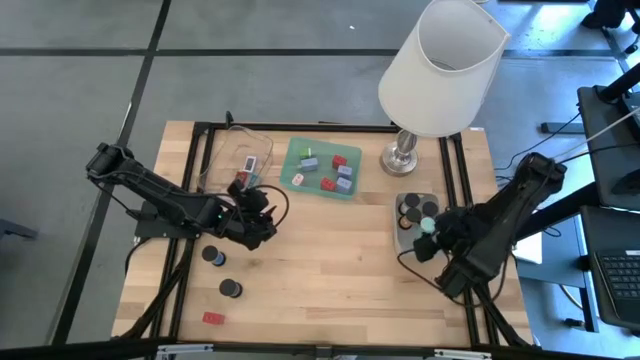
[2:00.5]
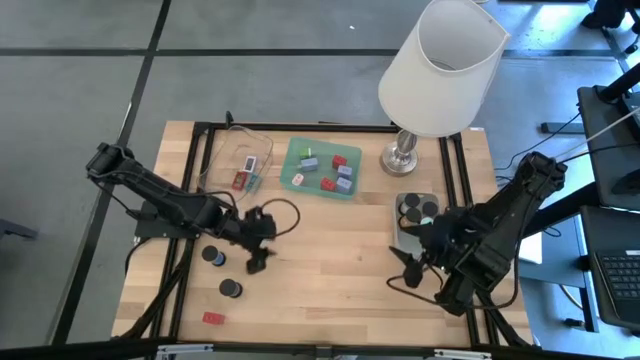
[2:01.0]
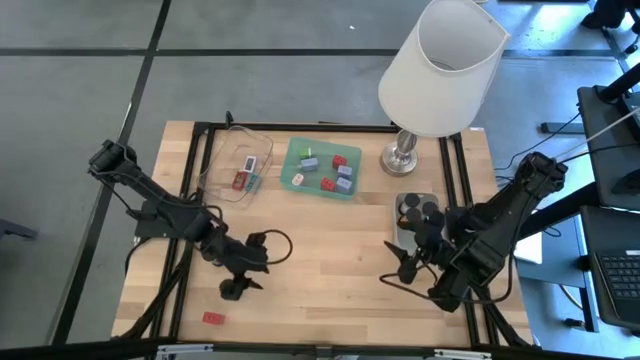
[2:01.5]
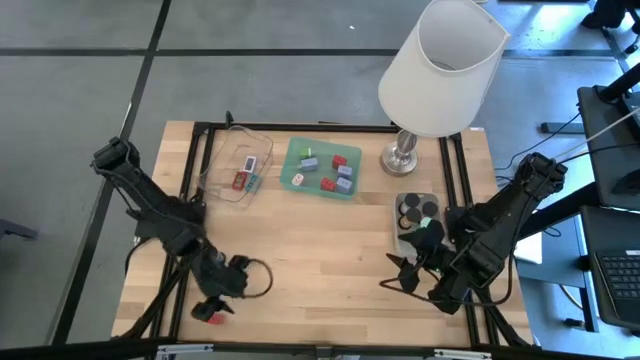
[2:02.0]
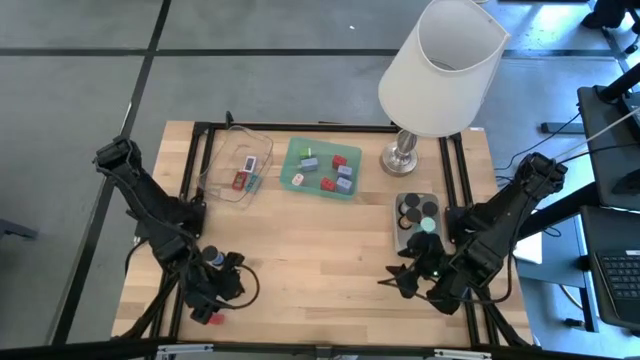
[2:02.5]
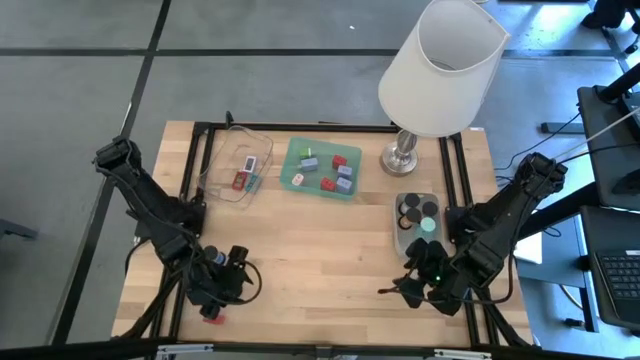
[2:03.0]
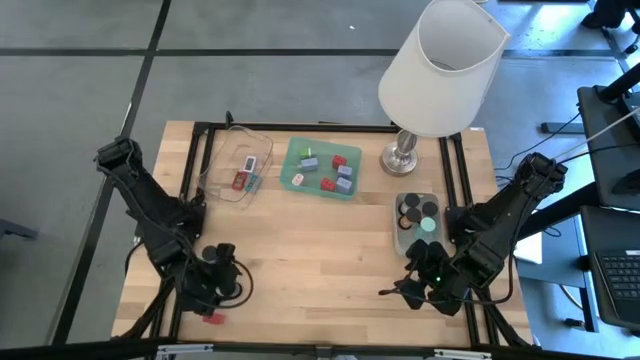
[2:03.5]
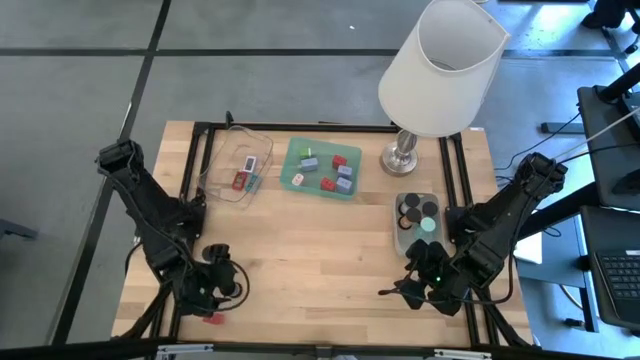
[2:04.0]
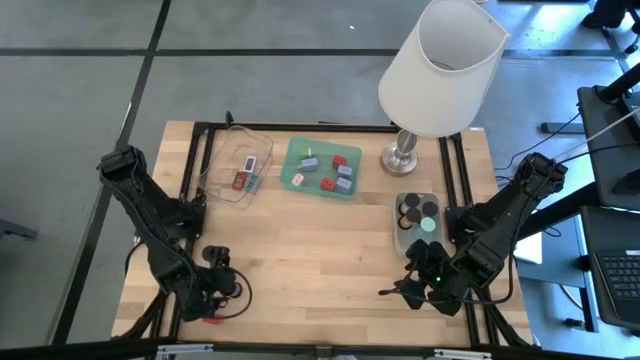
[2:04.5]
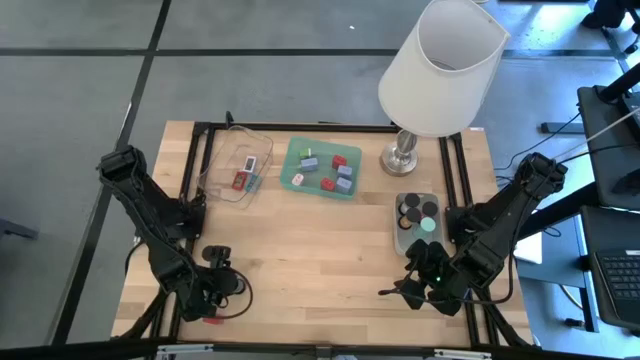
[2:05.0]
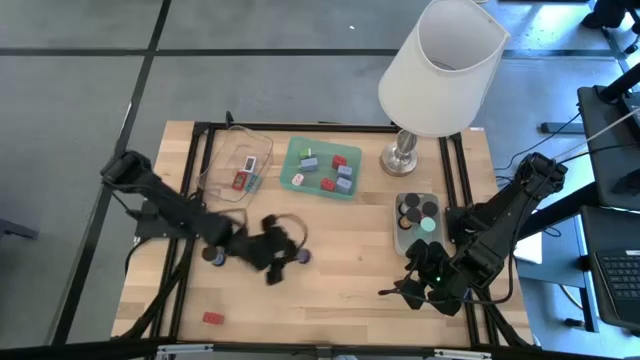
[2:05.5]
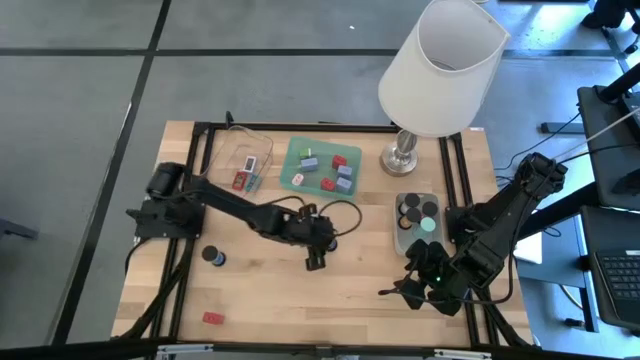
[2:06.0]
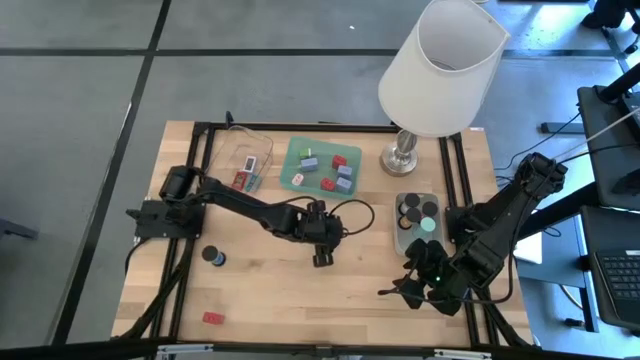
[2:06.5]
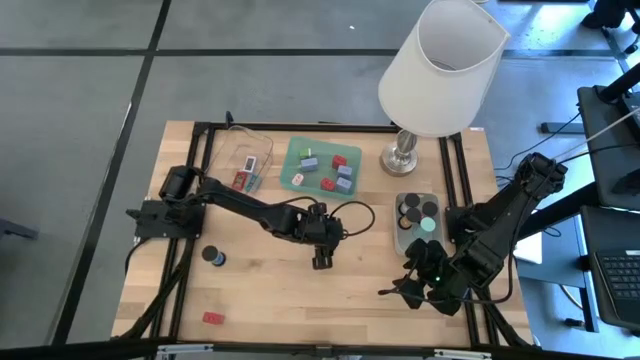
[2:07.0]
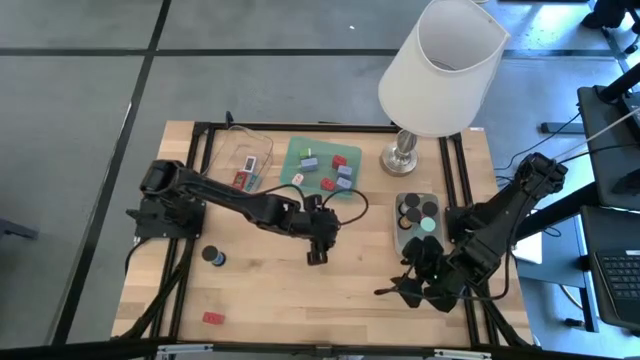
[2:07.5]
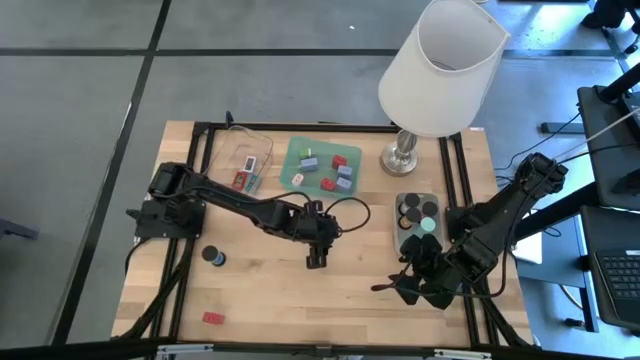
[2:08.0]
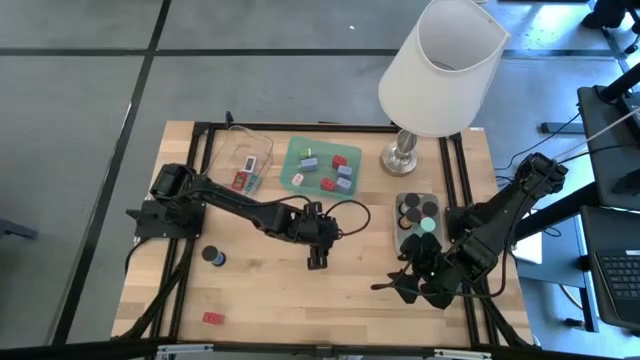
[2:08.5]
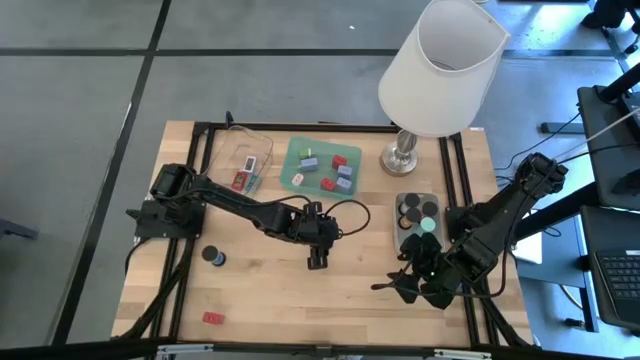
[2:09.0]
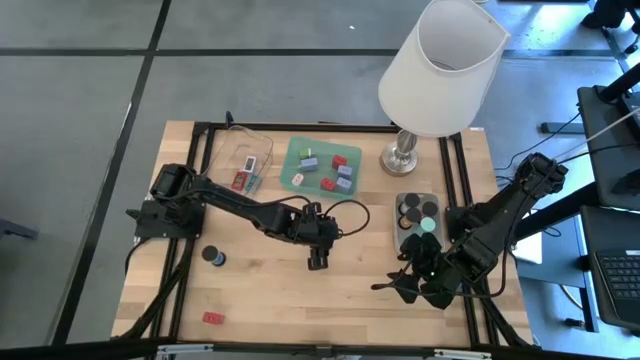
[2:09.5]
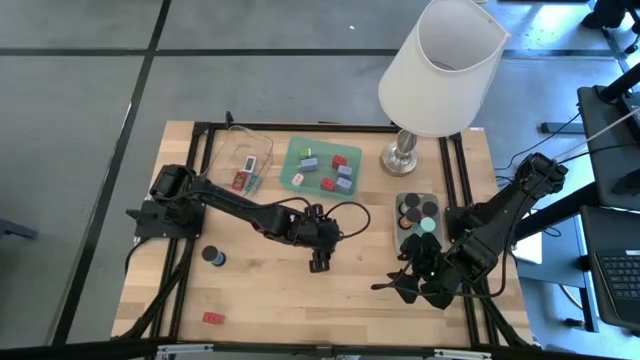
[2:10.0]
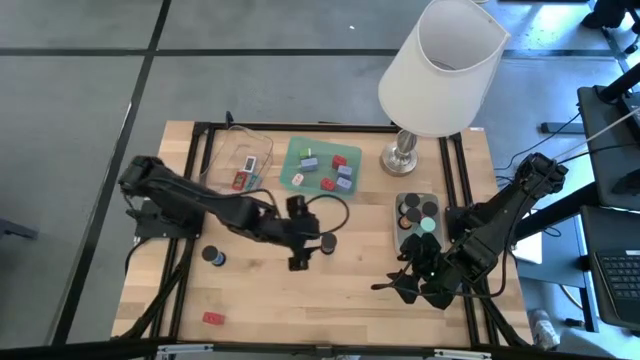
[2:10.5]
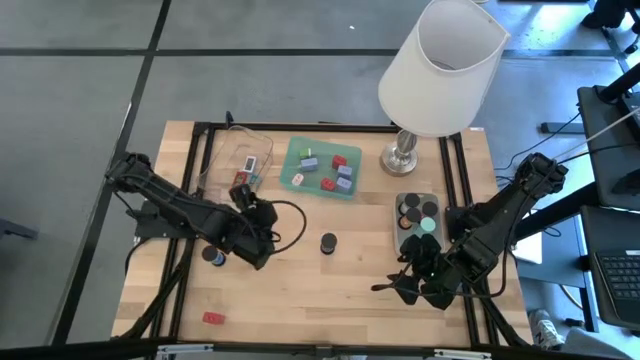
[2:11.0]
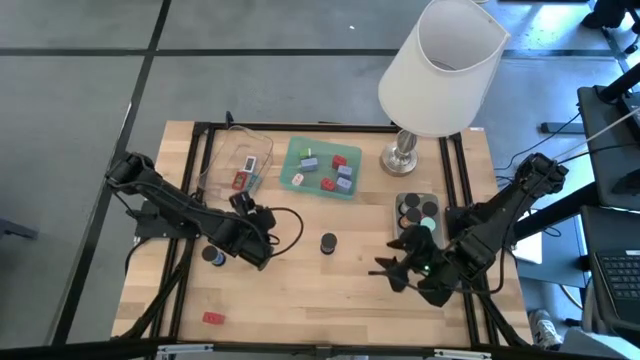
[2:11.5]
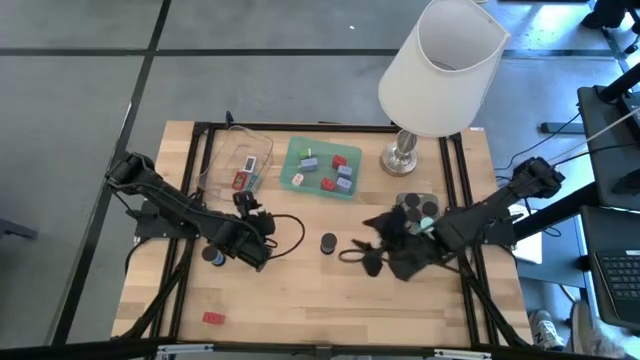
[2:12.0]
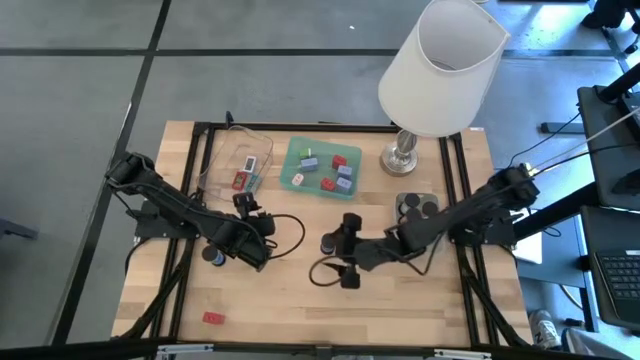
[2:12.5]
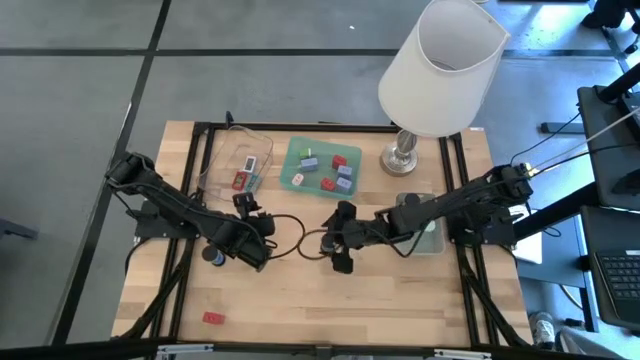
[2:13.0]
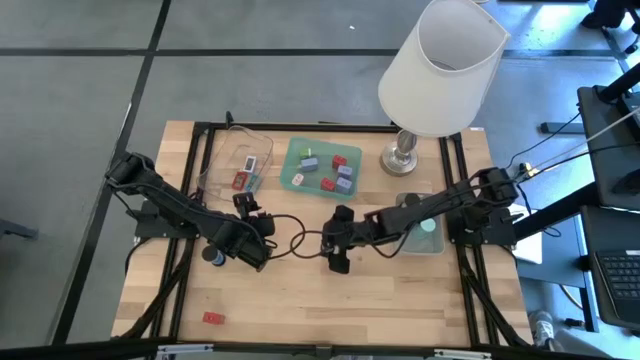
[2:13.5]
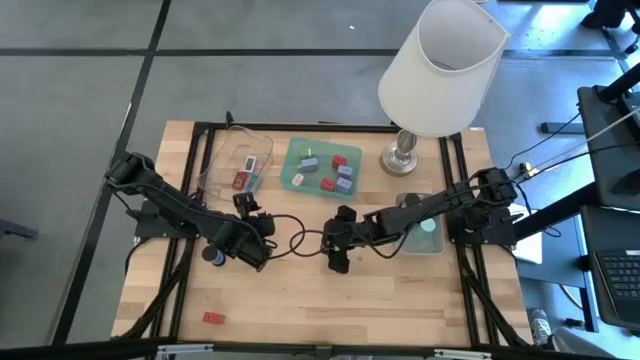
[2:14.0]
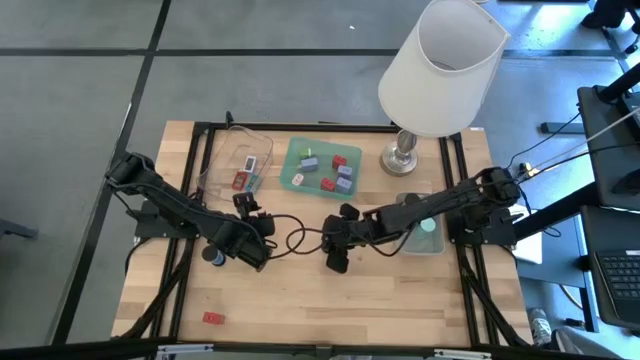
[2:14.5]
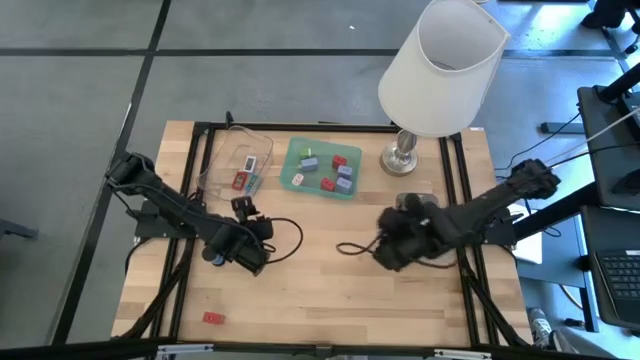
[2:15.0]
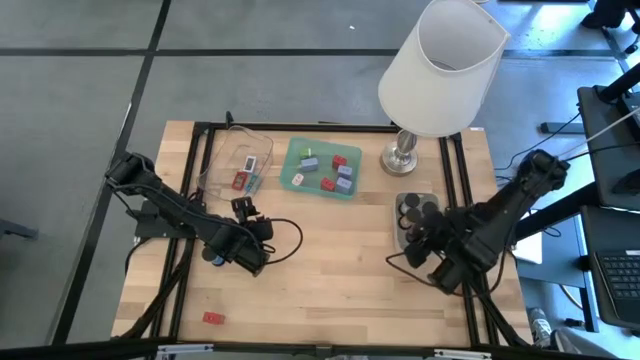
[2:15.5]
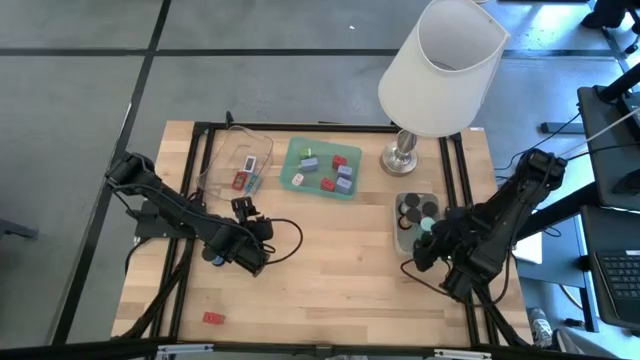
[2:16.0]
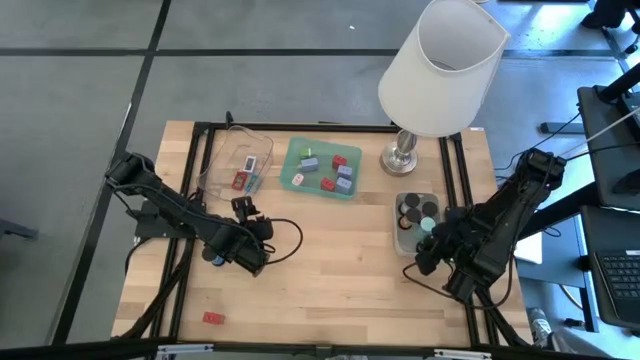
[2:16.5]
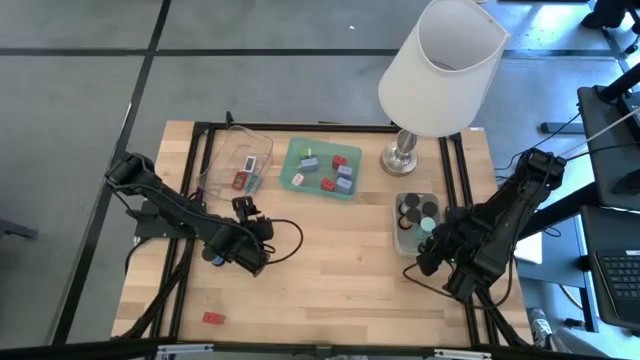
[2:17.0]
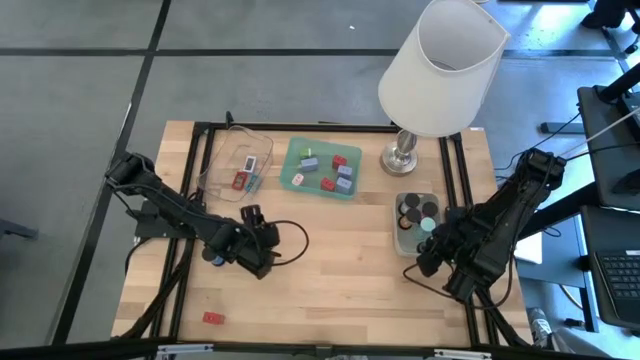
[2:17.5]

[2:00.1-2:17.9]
Task: Pick & Place Office items
Put the dark blue hourglass into the gray bin
